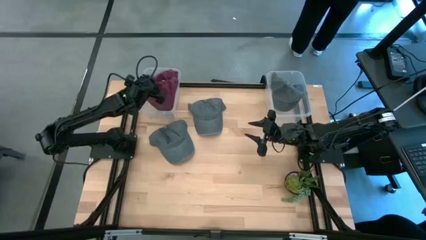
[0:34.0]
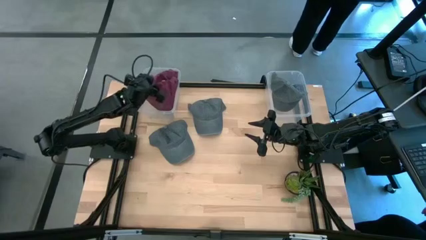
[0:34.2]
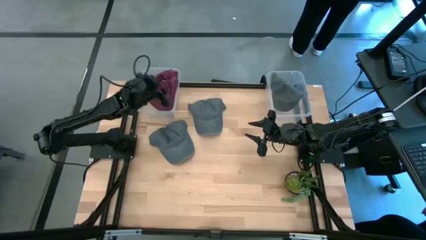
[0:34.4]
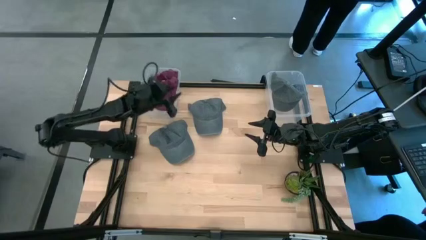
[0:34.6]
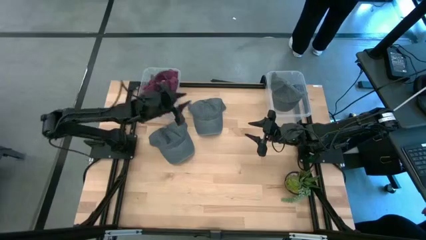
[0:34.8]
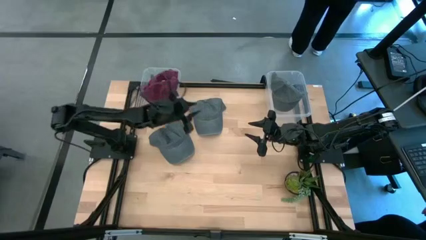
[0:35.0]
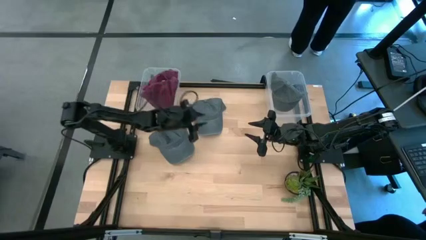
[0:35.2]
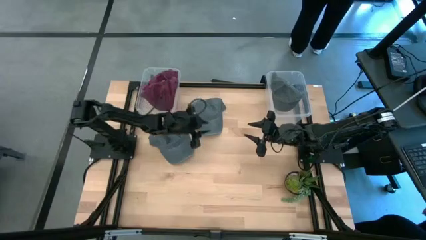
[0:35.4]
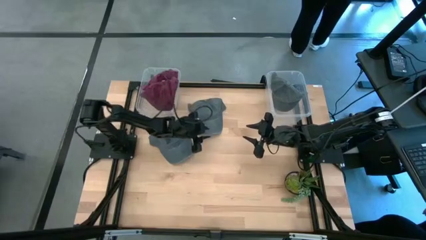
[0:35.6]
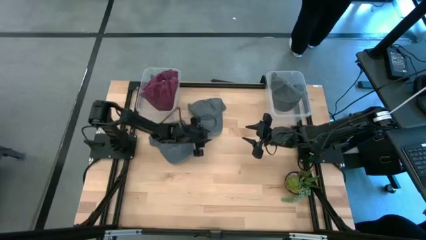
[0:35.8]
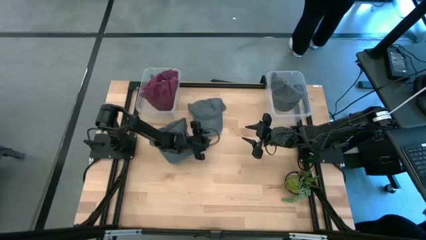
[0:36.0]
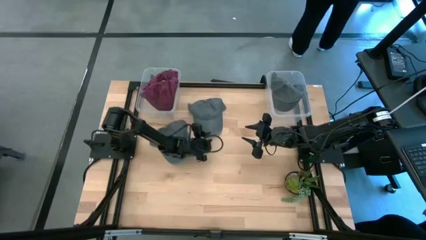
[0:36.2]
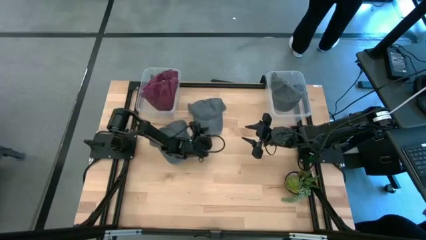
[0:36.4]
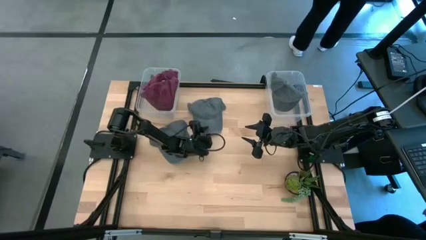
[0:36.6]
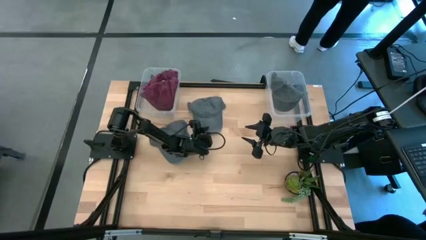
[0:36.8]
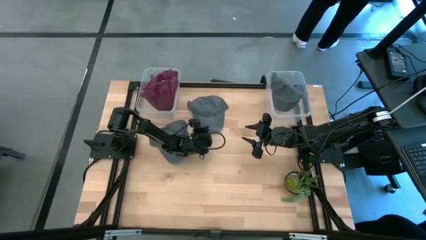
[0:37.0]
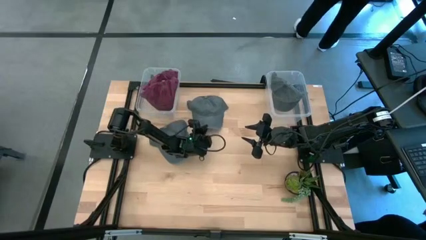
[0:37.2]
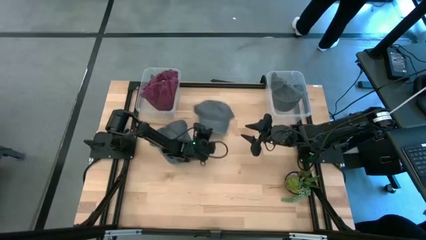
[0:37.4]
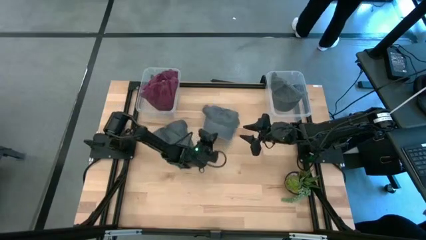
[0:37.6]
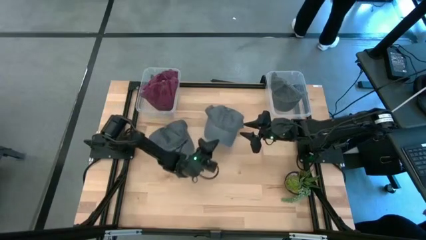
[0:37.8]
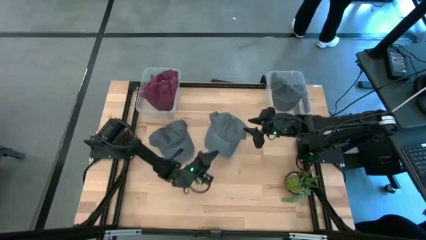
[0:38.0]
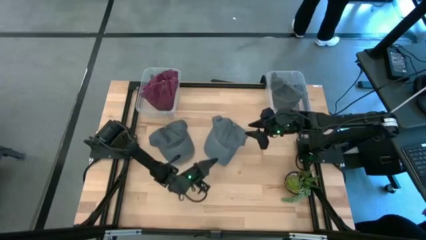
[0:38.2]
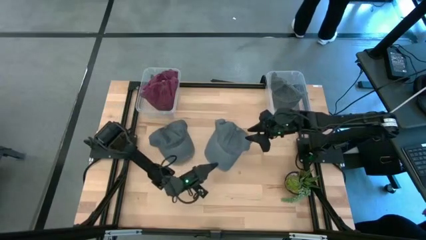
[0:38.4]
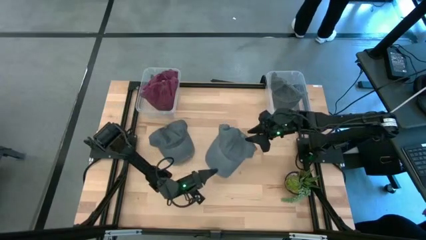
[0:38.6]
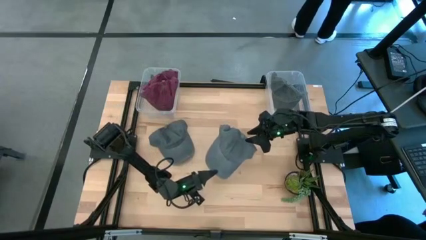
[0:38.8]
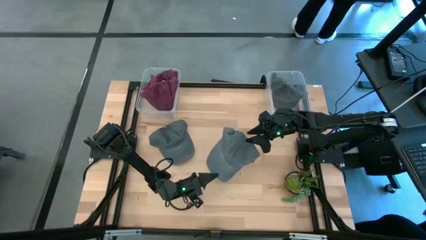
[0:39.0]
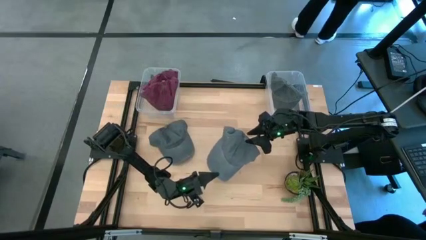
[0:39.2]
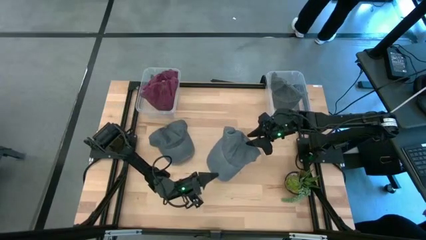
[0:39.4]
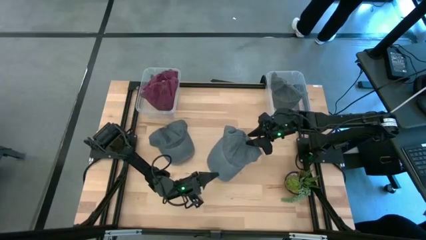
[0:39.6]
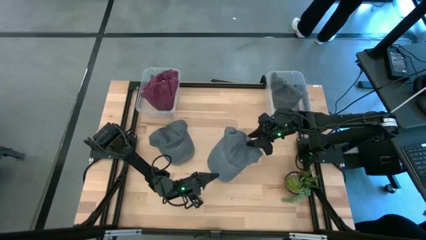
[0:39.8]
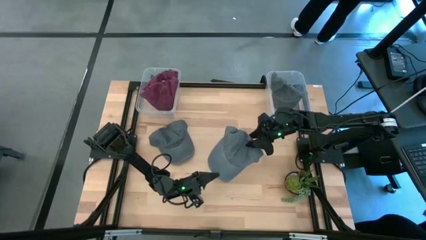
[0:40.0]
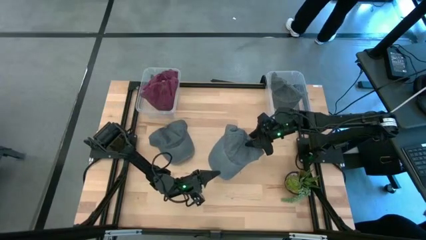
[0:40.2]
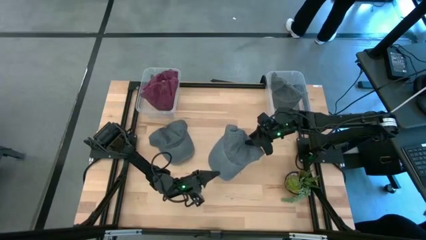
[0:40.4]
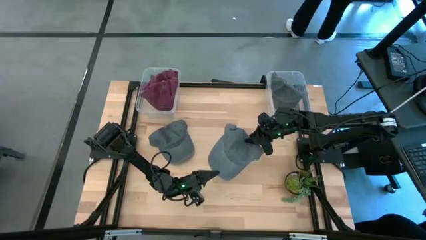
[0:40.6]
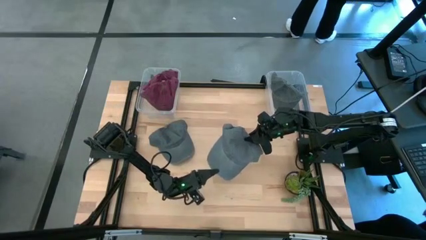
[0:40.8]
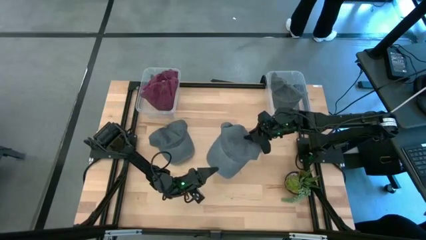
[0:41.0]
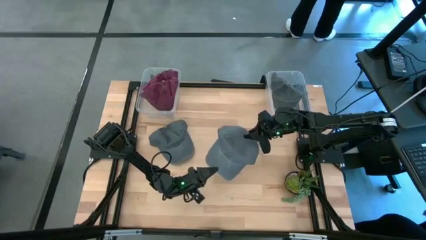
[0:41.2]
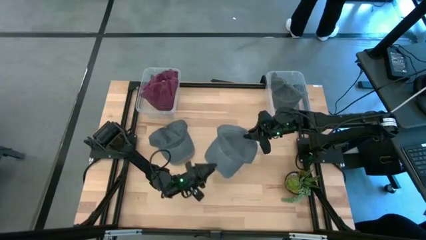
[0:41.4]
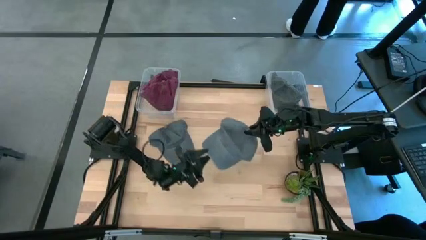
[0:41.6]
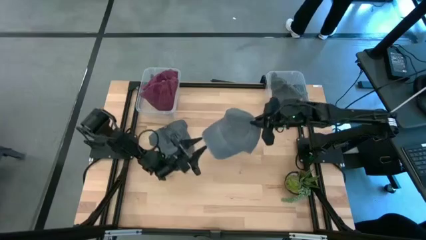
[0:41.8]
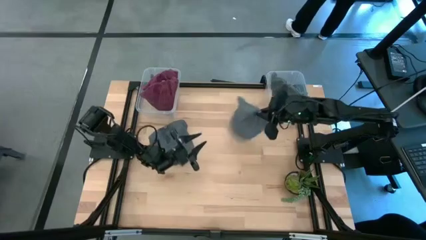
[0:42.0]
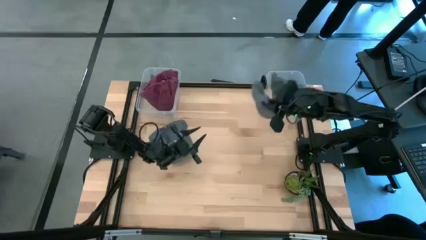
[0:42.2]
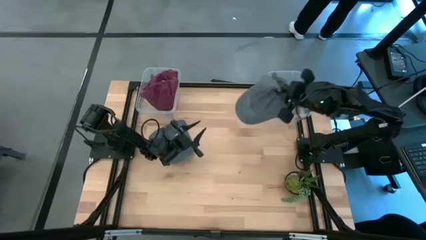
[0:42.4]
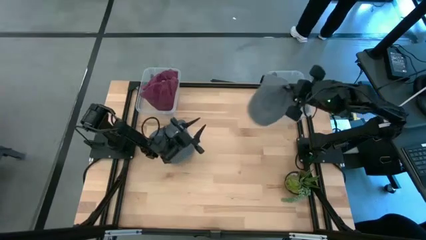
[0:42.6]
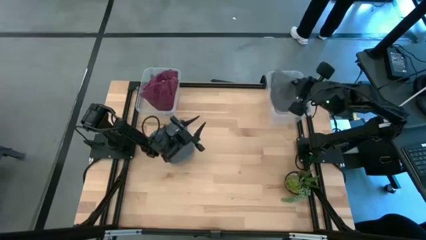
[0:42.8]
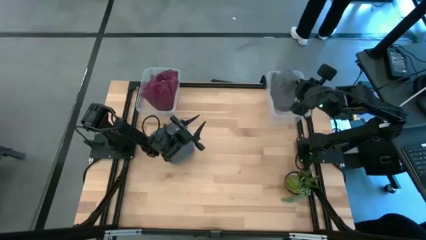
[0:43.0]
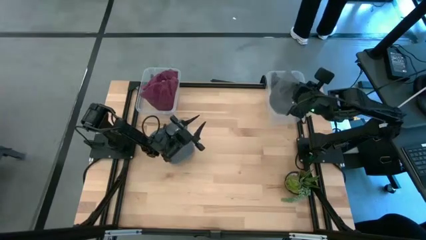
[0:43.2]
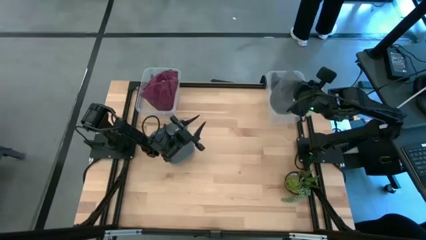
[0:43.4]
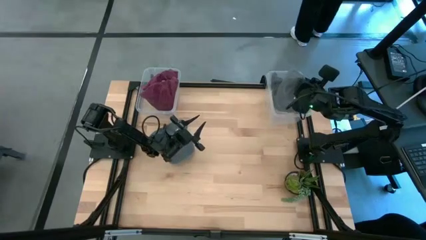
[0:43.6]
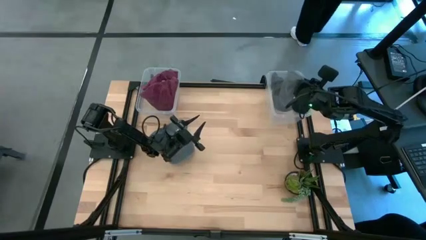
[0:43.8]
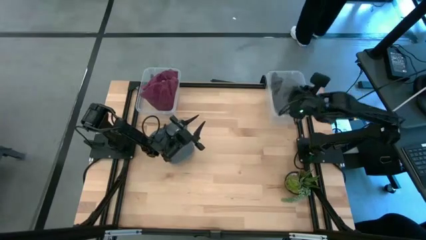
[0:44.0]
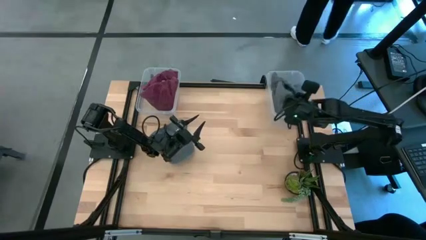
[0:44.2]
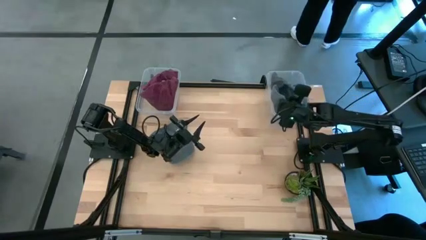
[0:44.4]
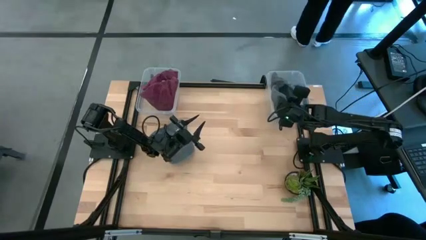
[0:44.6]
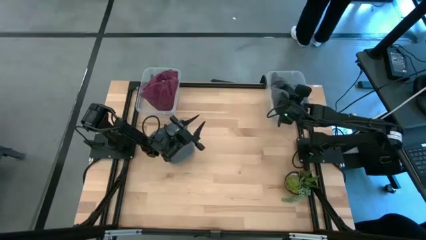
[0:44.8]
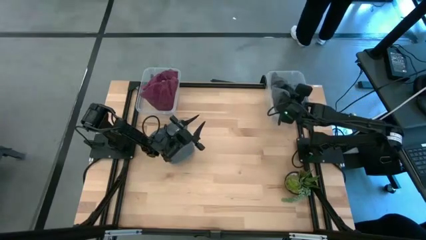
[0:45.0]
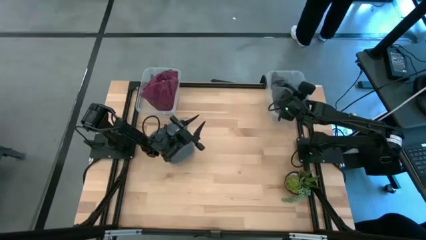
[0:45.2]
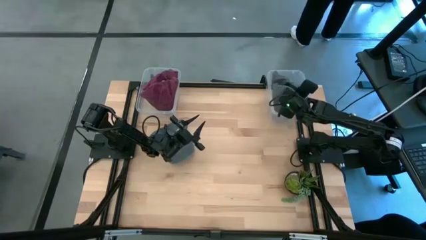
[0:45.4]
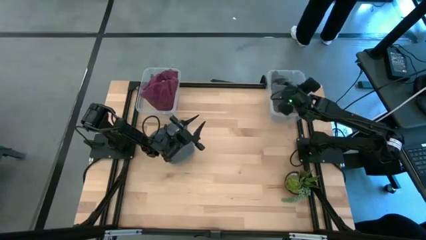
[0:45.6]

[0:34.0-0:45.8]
Task: Pick & Place hat
Put the top gray cap into the right transparent bin

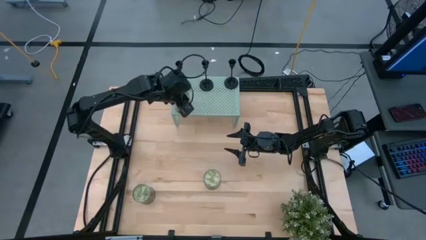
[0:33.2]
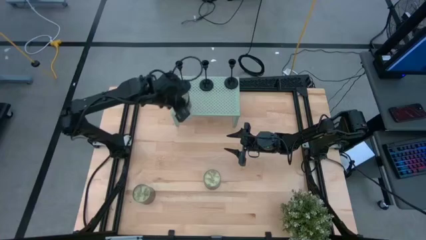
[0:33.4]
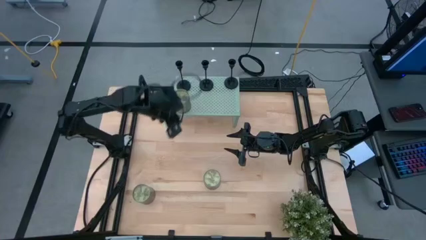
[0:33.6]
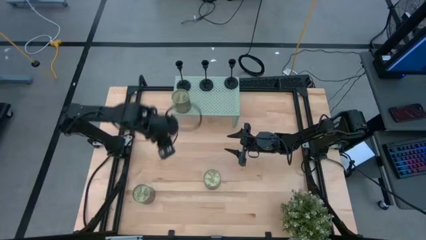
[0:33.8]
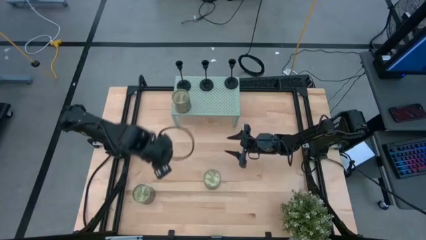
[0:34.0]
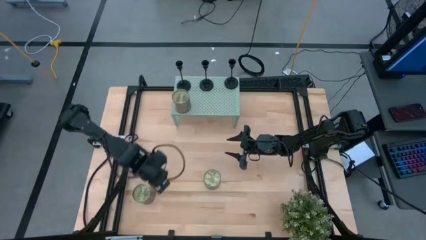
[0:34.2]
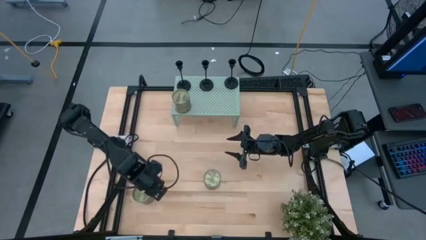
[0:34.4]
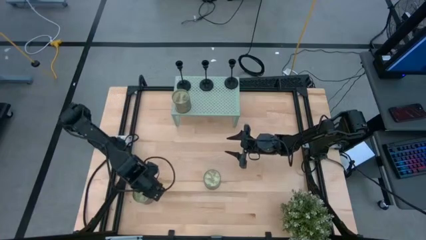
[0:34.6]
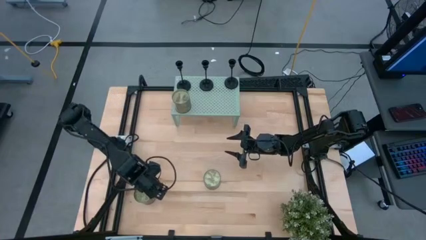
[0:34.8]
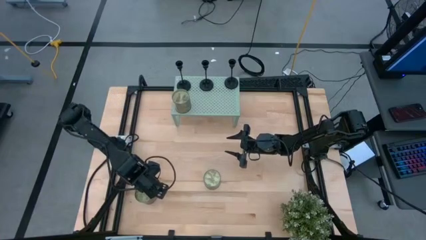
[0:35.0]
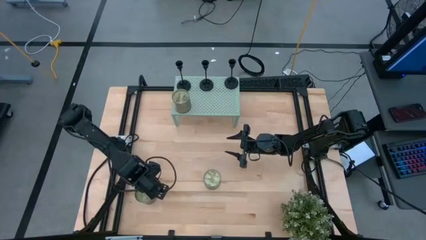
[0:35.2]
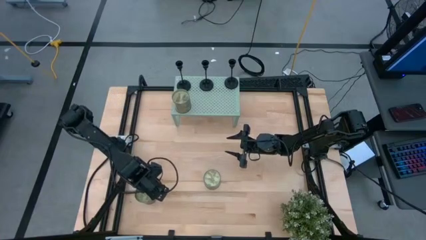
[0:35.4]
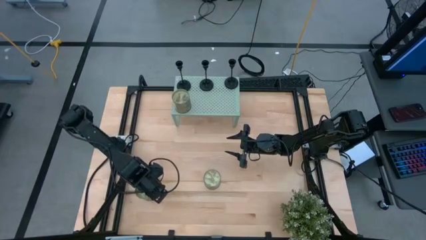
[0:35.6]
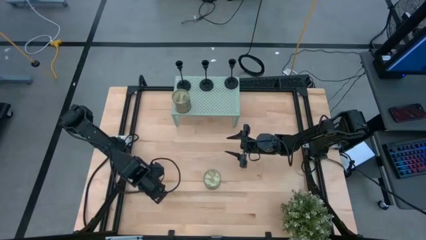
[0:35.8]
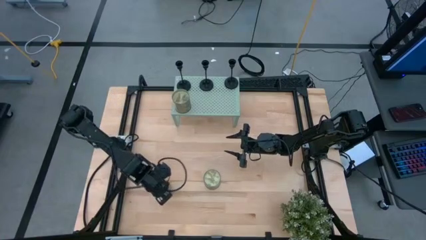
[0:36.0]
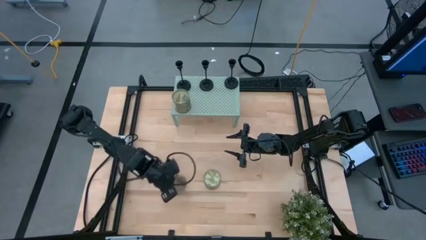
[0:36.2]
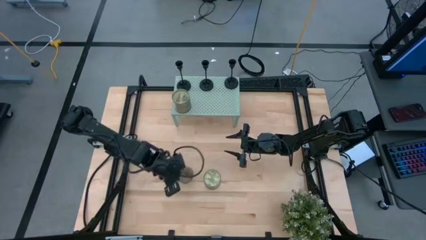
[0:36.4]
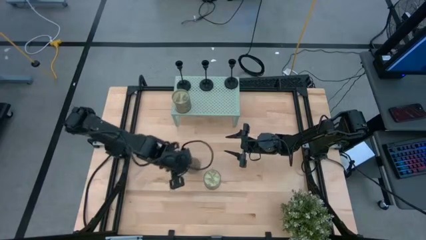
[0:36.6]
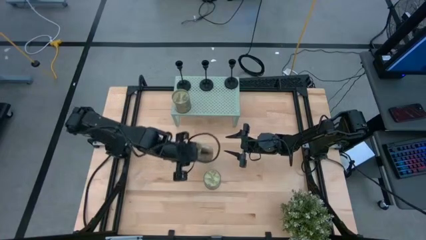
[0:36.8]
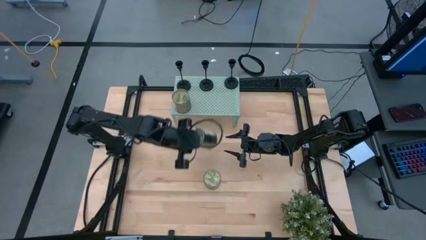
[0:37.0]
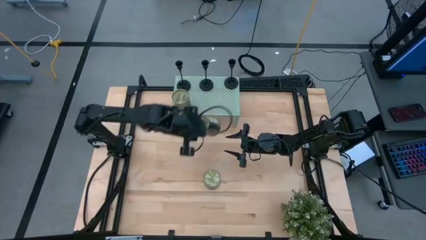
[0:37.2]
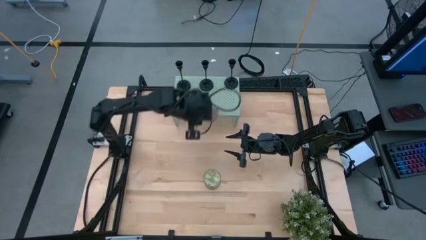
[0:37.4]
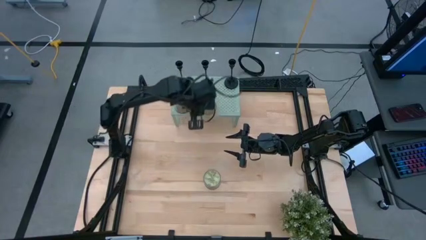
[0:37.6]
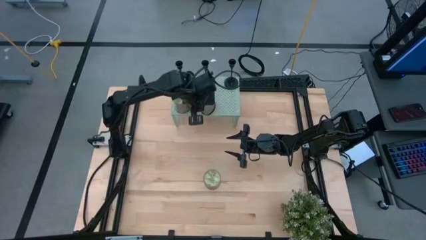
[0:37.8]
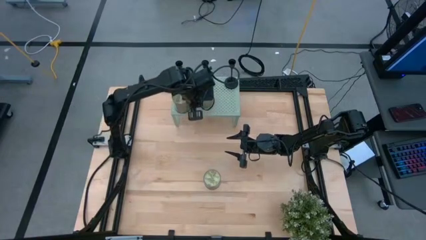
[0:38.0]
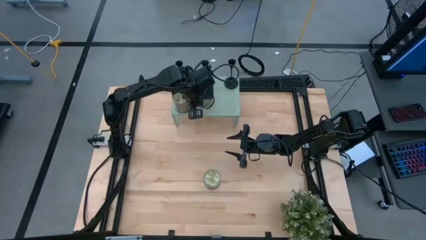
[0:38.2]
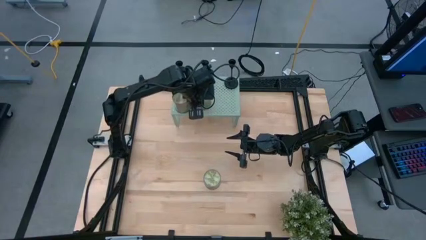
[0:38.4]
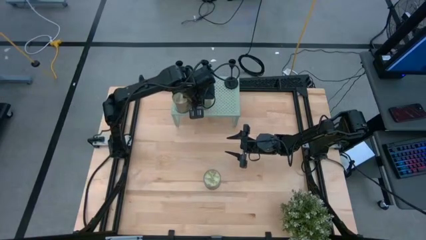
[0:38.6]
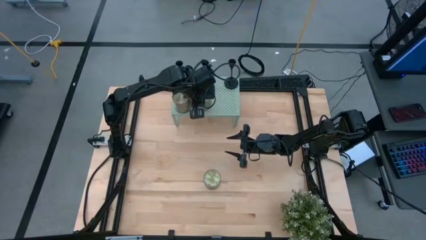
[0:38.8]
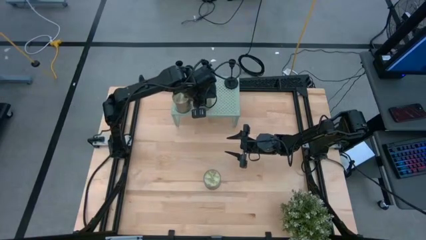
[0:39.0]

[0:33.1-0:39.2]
Task: Pick & Place candle stick holders
Put the bottom scented candle on the shelf
